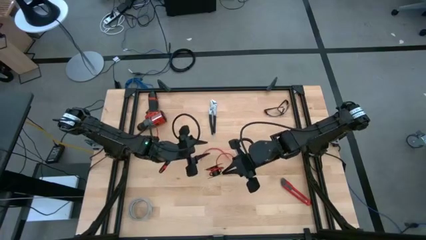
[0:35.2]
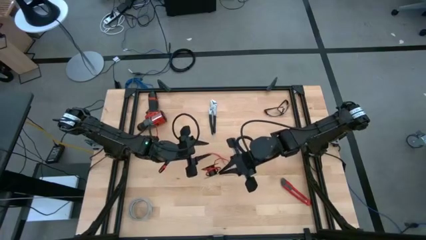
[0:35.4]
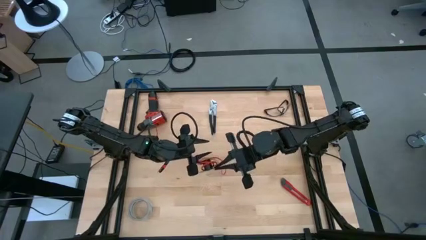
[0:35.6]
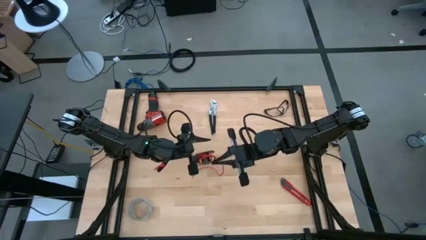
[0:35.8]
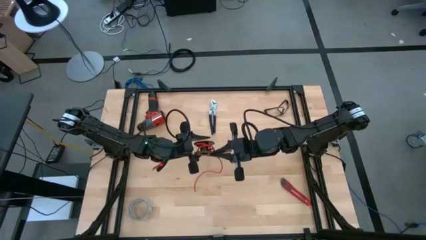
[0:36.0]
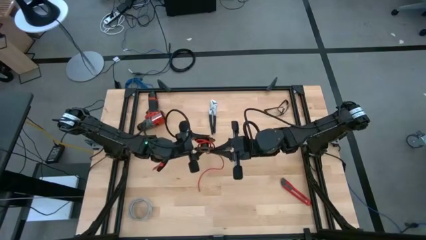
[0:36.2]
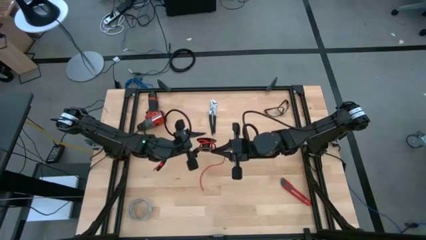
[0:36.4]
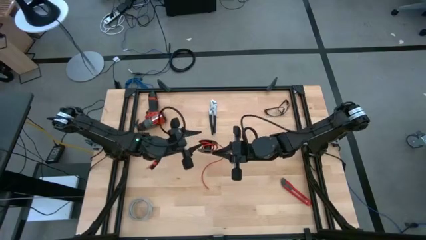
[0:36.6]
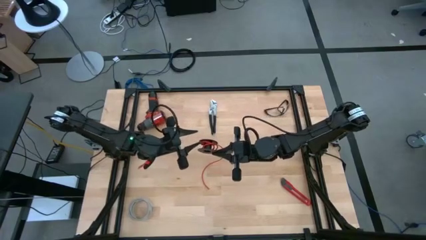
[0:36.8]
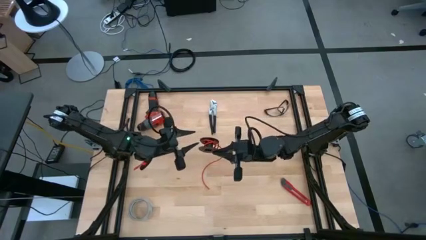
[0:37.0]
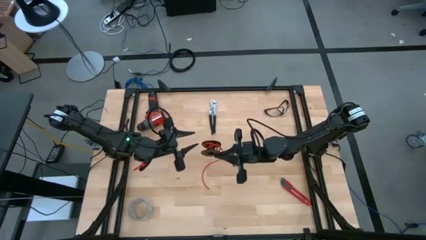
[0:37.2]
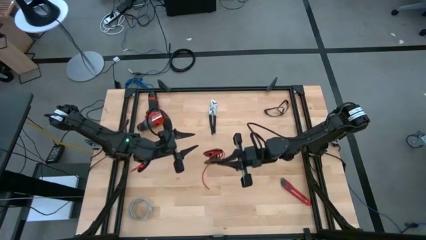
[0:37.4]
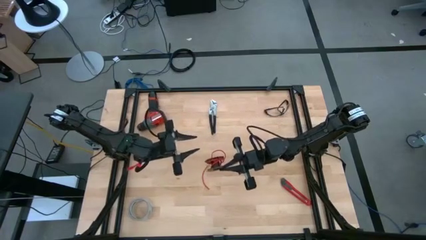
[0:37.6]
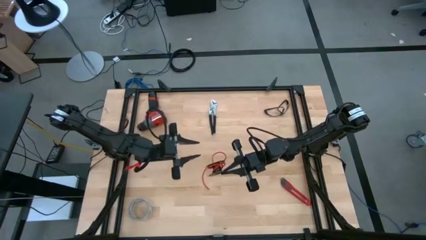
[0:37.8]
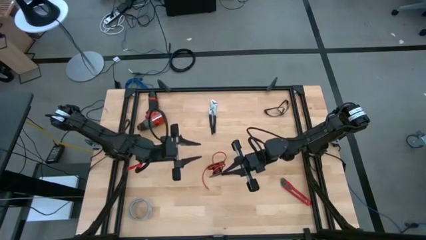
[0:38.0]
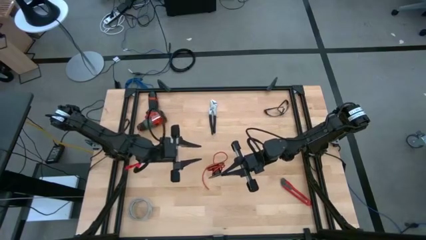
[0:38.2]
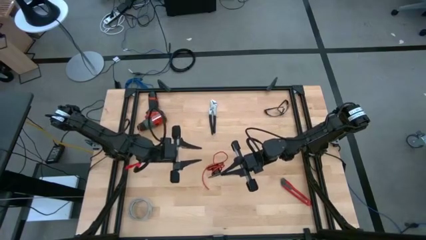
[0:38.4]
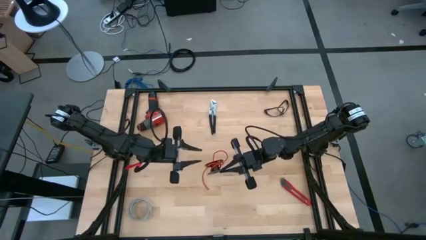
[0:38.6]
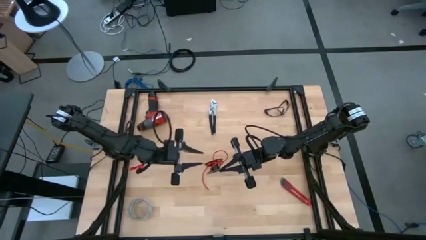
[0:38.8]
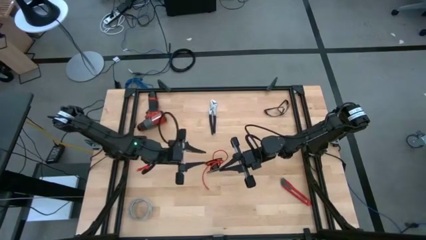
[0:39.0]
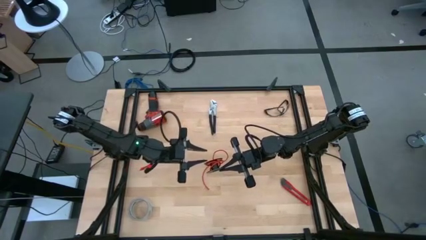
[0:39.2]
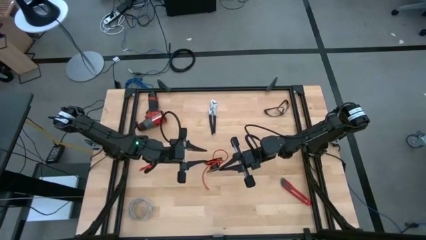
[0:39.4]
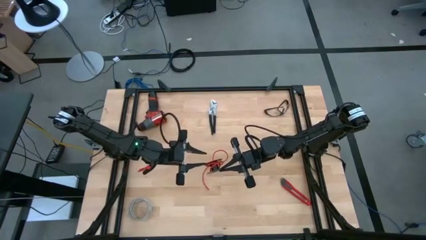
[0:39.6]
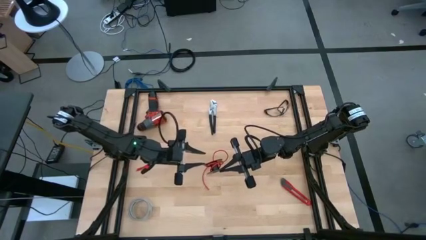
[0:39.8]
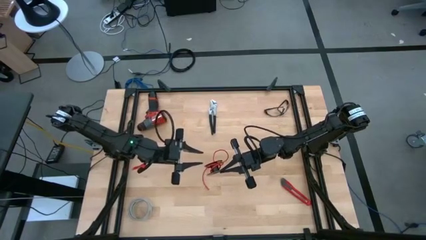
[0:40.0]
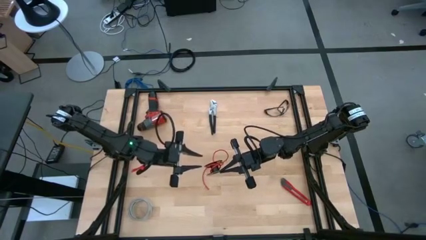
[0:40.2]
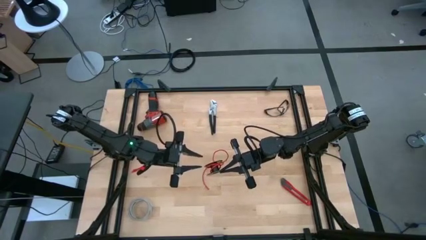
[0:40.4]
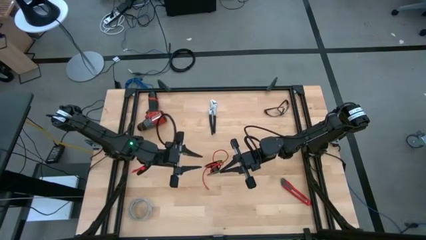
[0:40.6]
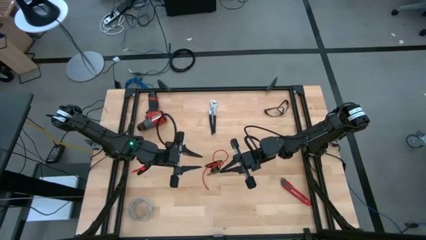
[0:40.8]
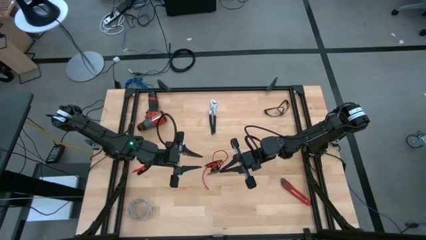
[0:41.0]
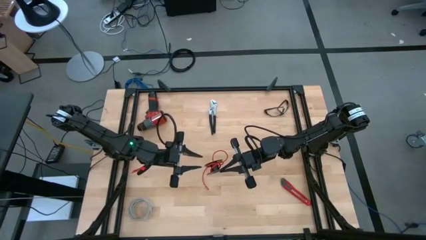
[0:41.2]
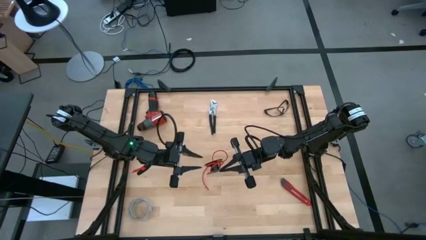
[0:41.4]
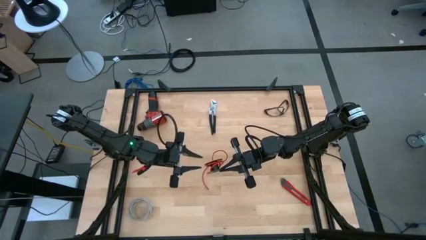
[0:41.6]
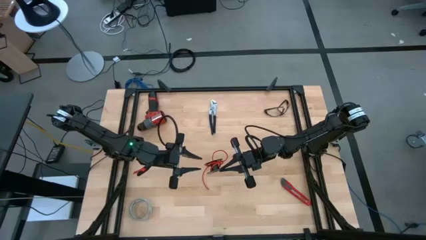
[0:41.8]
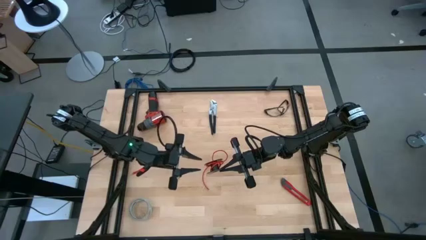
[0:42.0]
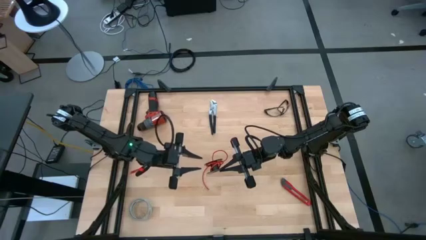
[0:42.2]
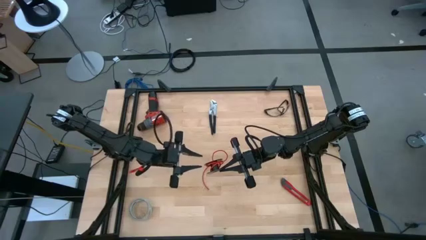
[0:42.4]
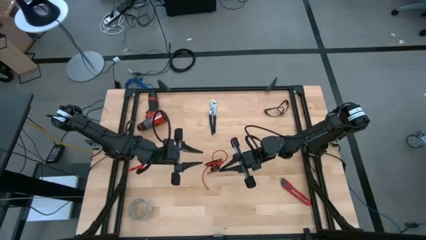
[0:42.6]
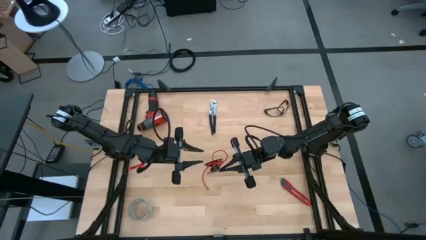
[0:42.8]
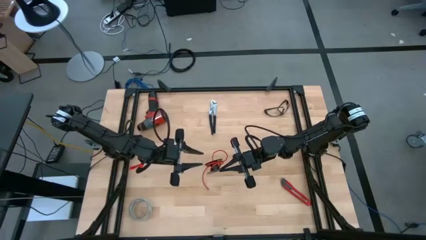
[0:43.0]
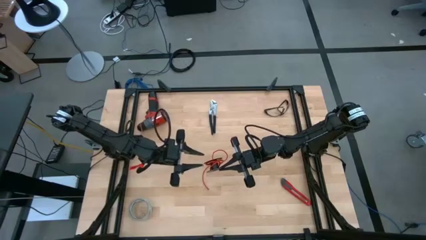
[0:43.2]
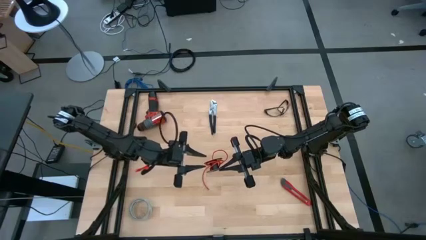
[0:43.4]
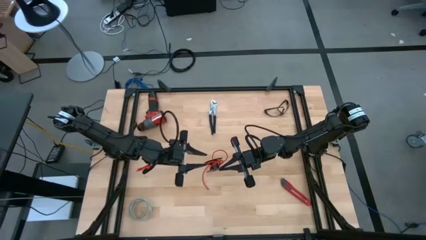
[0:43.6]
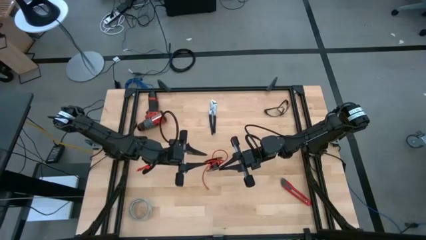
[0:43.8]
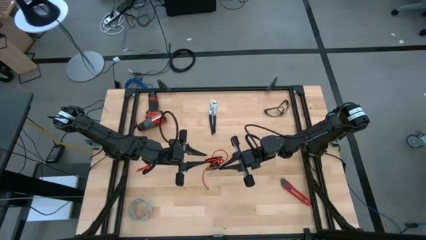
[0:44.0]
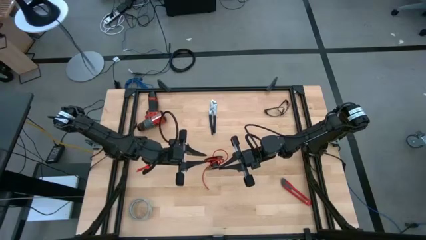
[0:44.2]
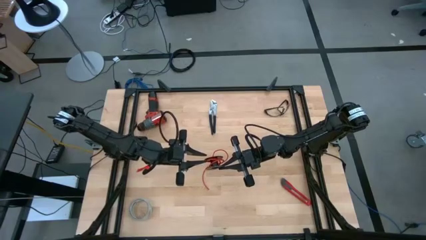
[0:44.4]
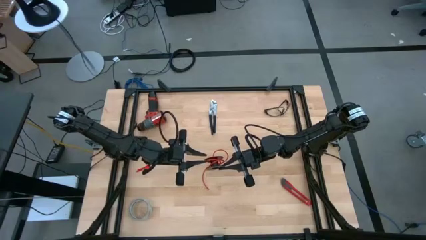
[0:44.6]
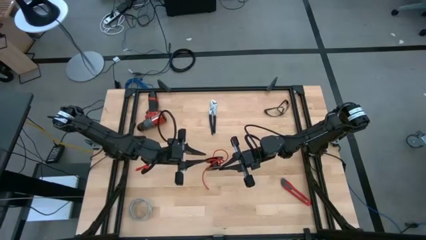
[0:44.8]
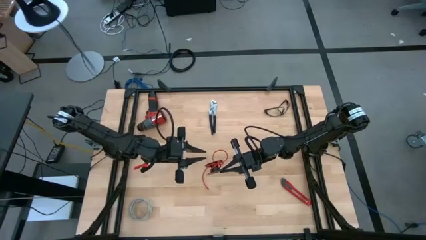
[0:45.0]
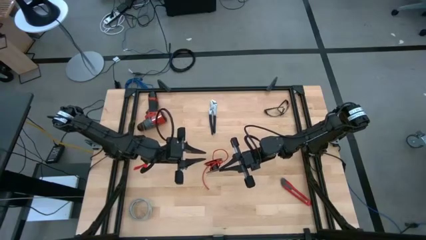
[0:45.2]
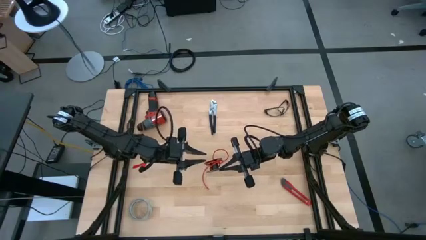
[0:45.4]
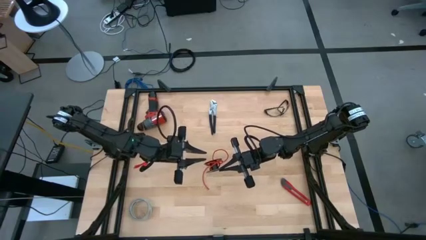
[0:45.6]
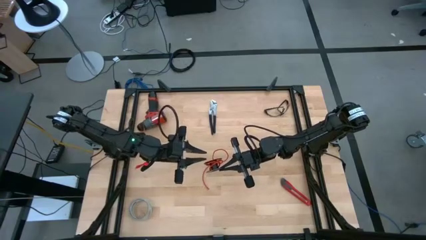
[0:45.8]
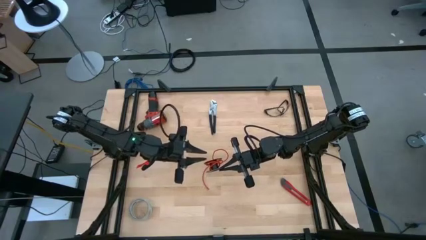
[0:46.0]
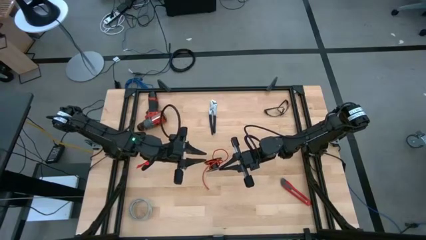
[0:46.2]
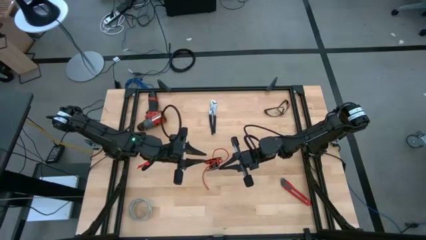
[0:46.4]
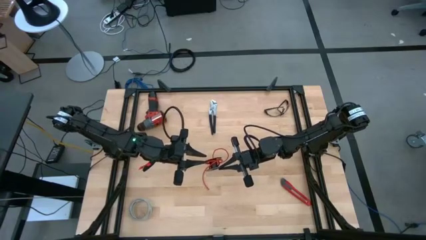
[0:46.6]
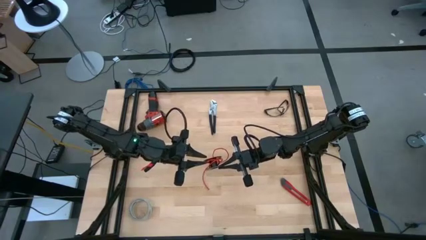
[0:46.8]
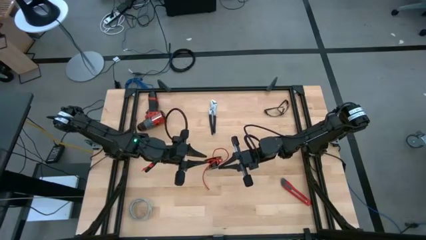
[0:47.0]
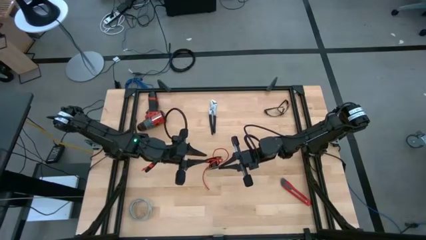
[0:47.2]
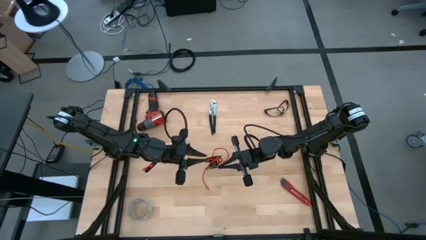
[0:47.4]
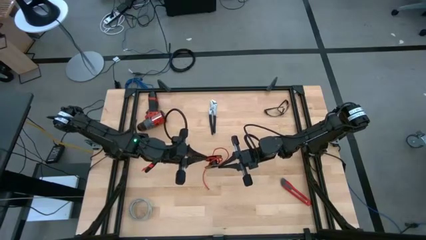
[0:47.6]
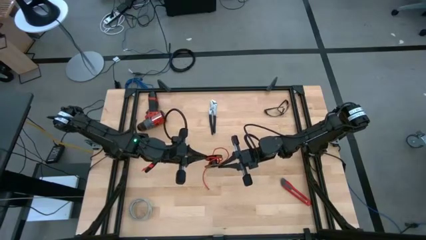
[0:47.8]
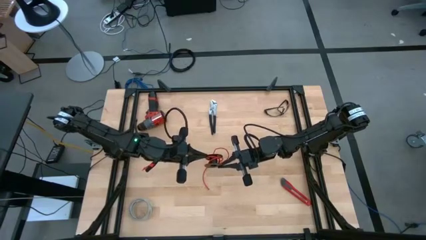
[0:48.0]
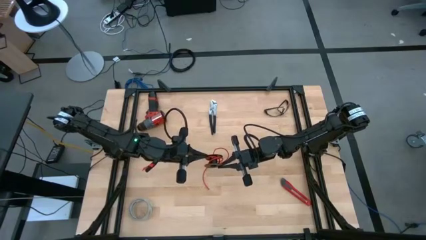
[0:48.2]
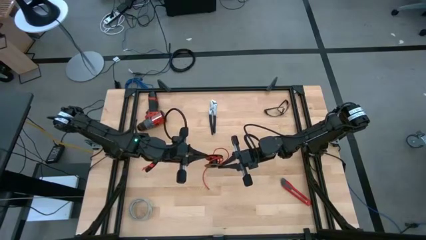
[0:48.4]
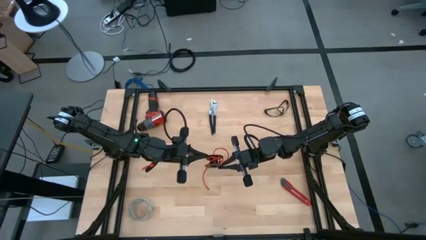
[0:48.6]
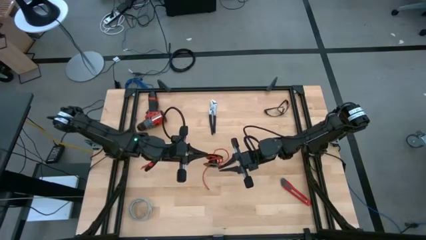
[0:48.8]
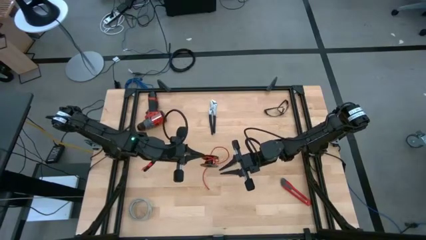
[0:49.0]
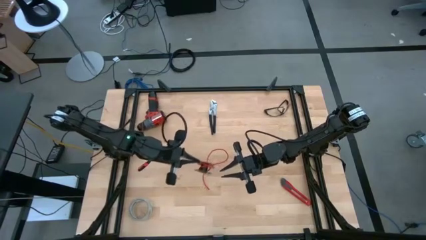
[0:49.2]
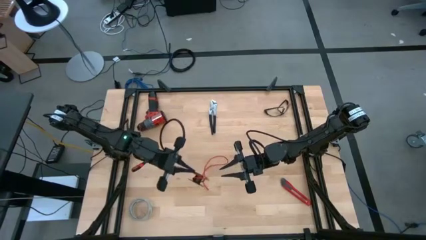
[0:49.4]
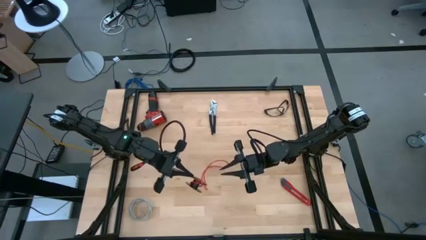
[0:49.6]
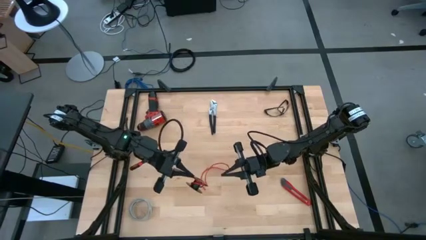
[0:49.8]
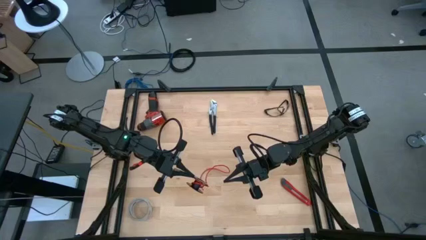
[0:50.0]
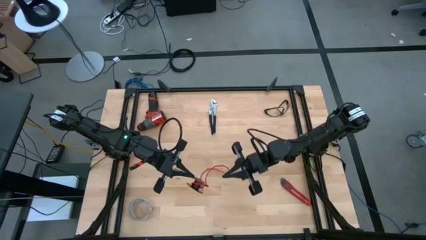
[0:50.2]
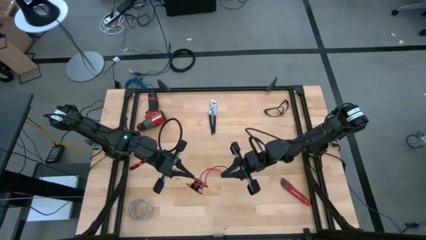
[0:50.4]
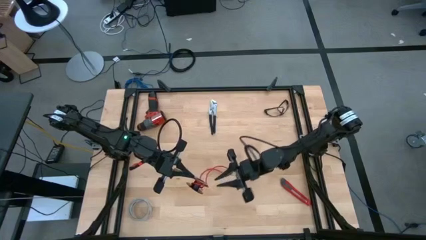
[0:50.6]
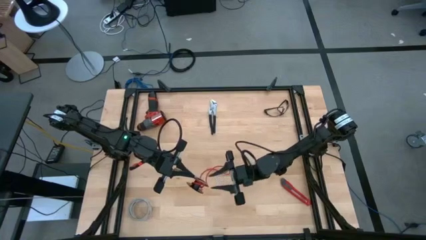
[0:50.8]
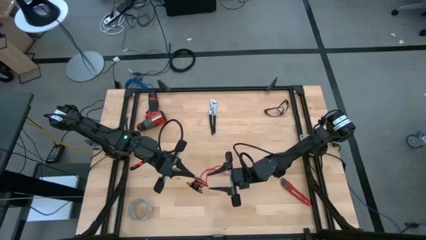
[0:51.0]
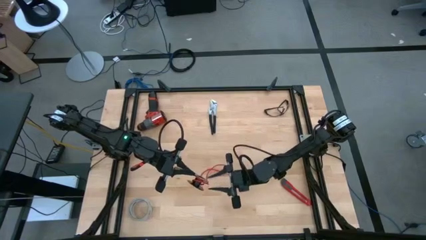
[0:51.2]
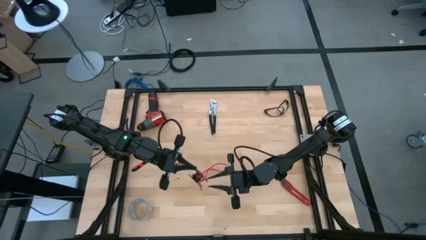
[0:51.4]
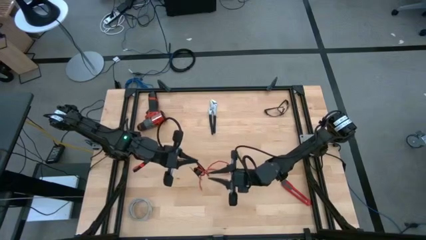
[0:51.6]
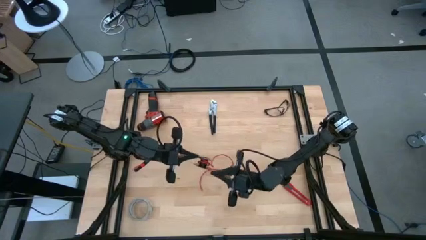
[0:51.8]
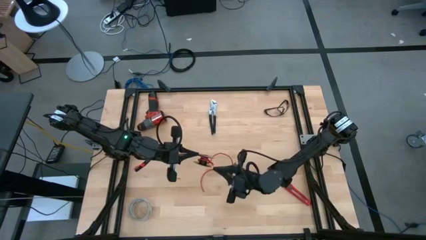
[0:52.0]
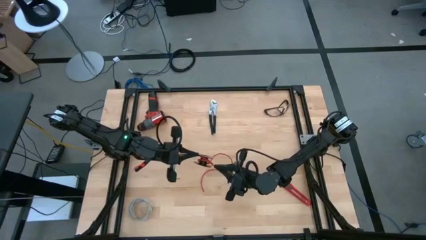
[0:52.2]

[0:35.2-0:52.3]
Task: Coil cords
Uncoil the red wire from the black spool
